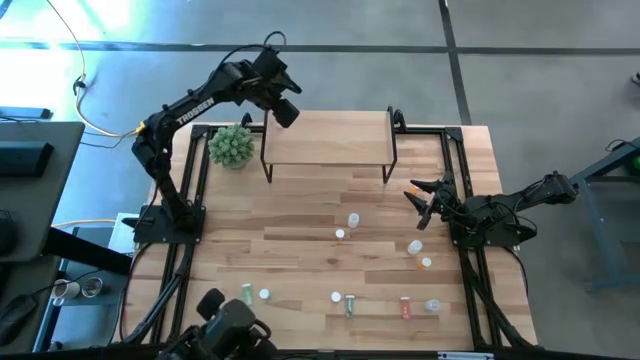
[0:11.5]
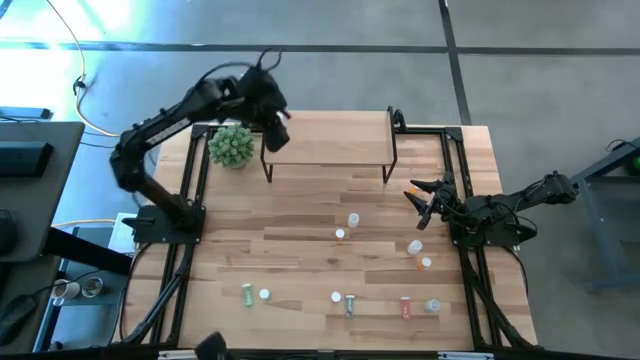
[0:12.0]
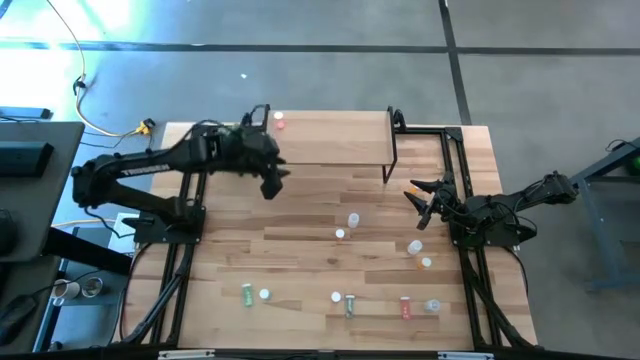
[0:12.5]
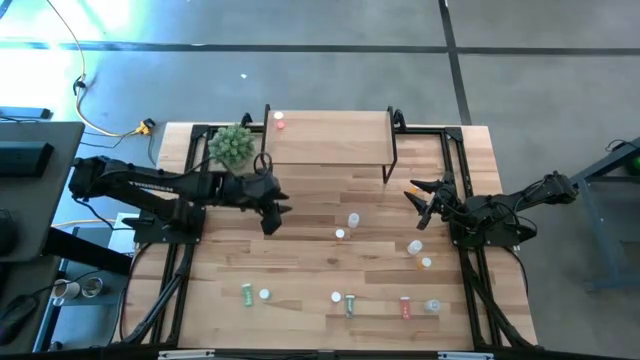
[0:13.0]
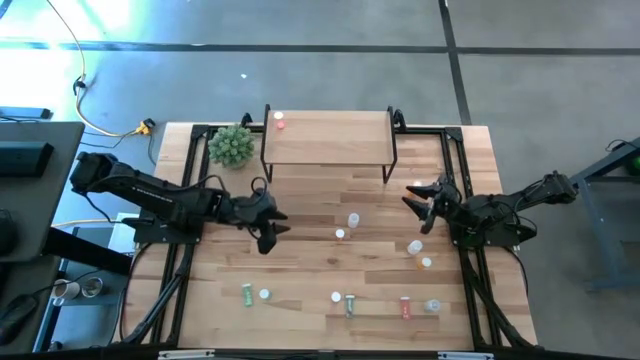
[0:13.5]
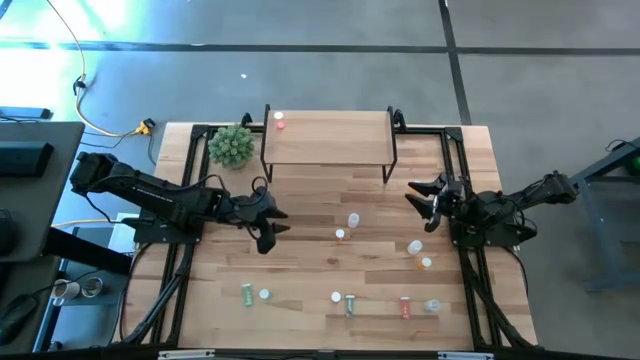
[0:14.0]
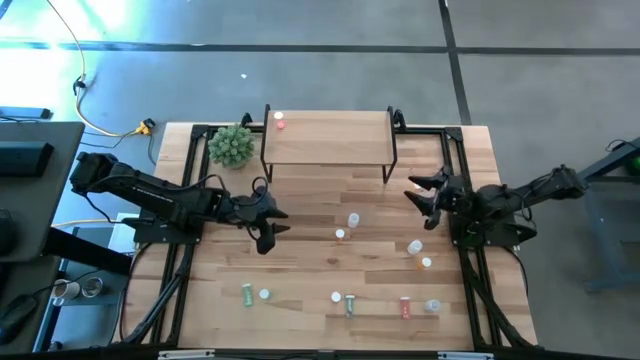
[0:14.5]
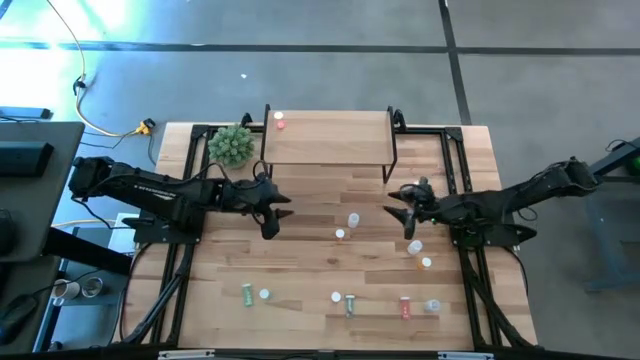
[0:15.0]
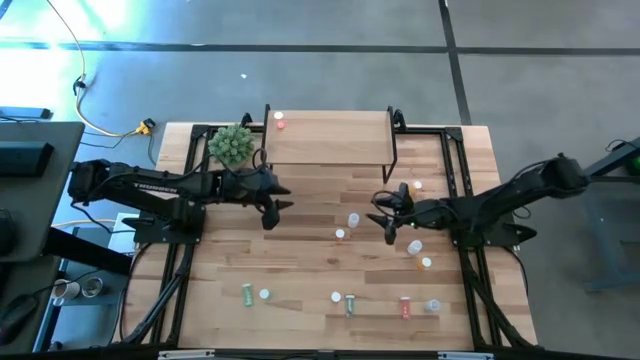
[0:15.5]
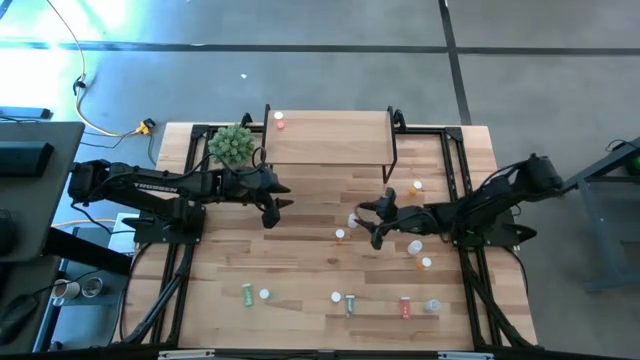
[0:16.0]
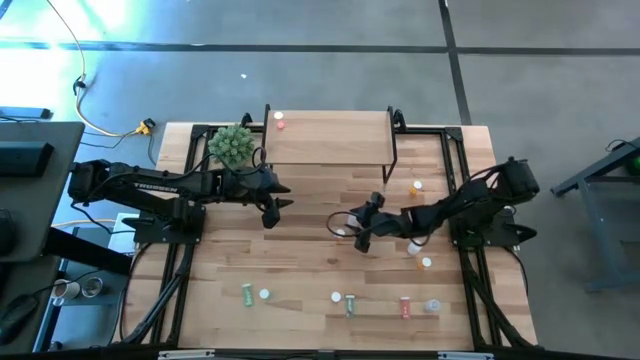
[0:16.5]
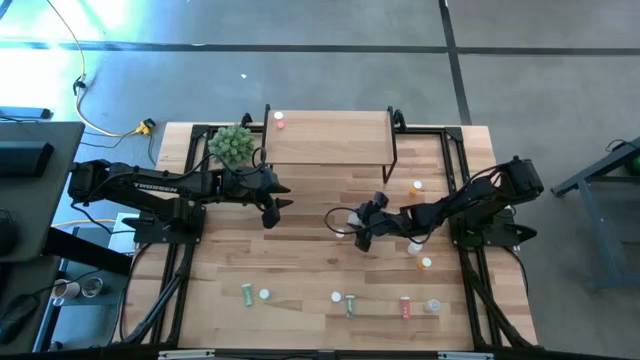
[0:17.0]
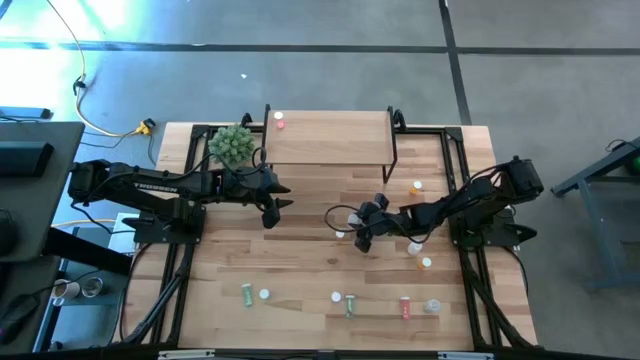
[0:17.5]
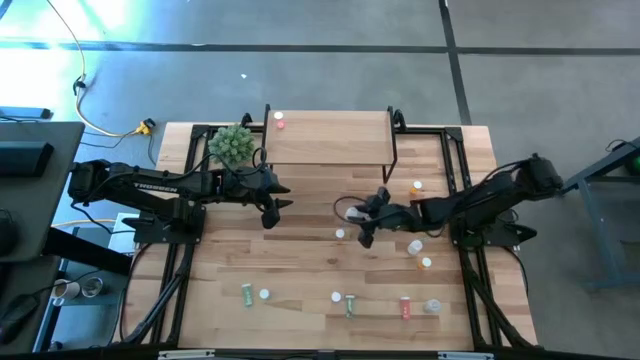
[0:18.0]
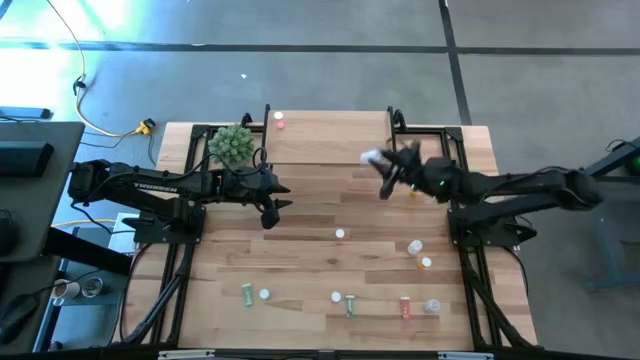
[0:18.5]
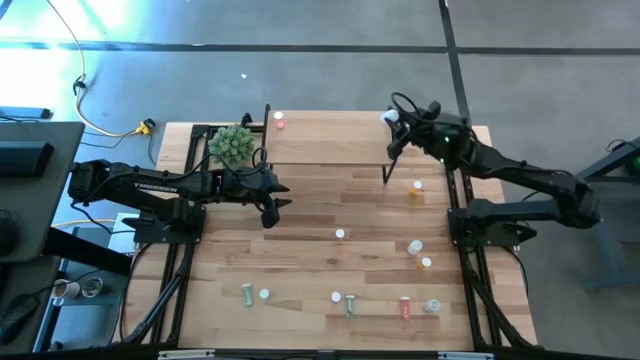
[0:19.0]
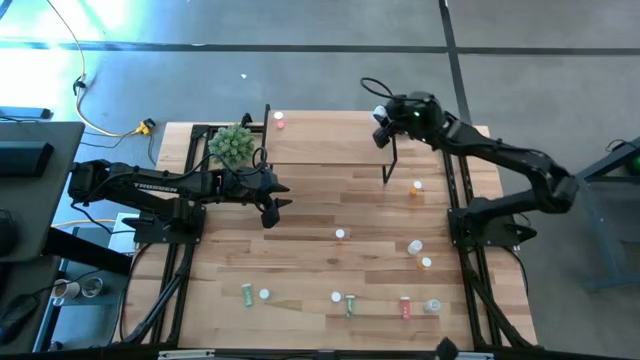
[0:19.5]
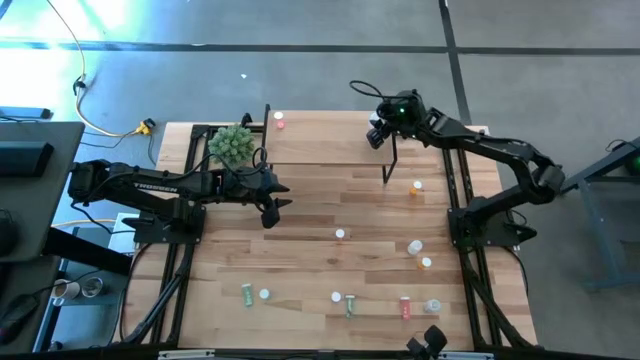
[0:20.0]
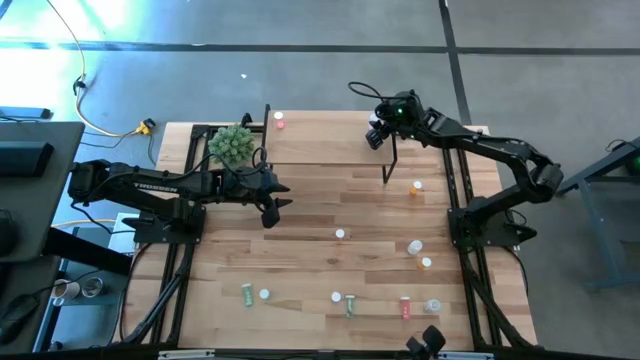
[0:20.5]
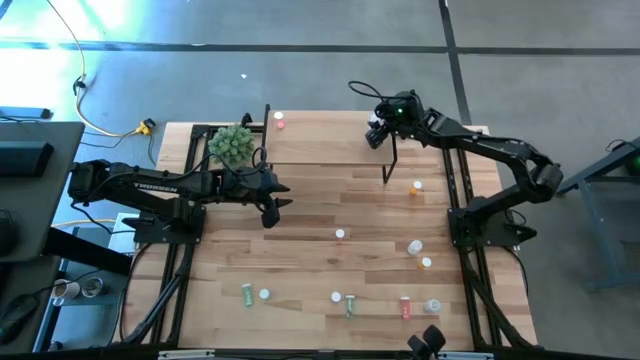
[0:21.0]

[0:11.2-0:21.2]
Task: Pick and place medicine bottles onto shelf by color
Put the top white pill bottle on the shelf

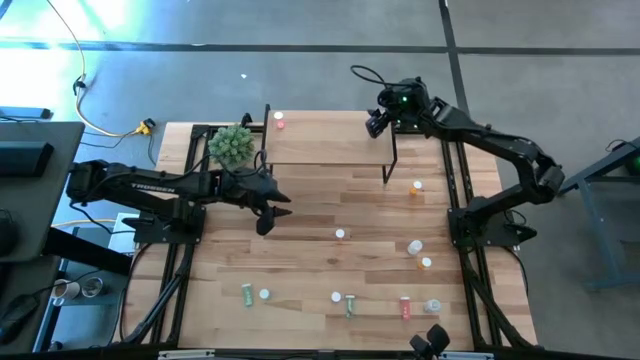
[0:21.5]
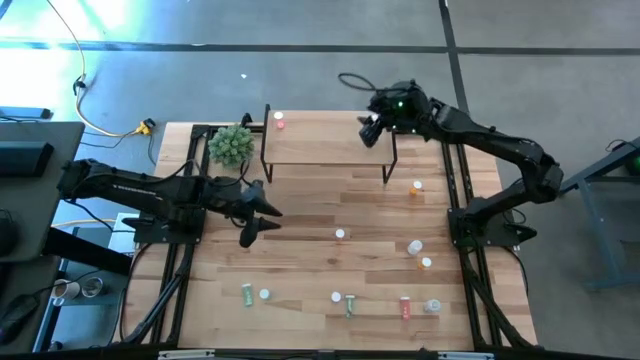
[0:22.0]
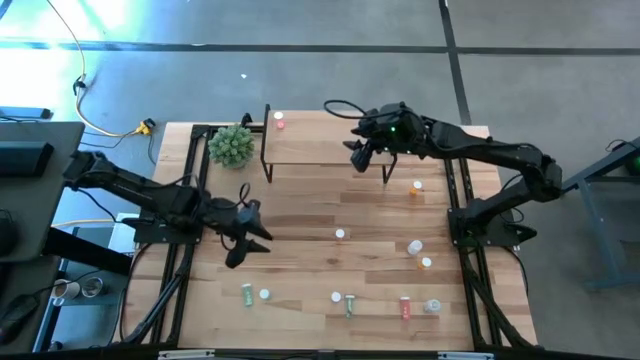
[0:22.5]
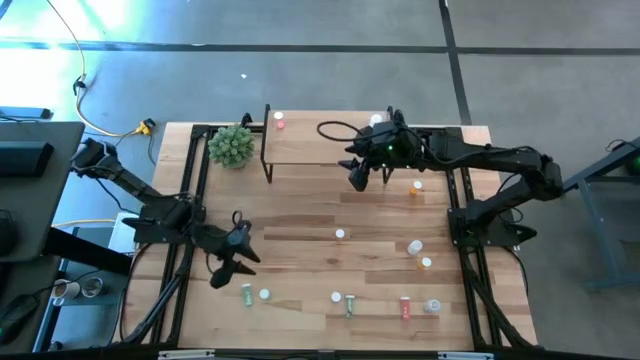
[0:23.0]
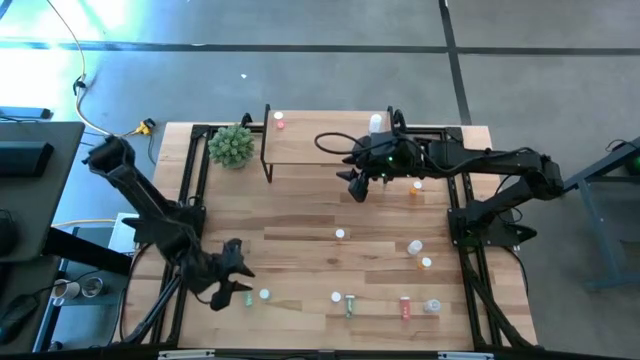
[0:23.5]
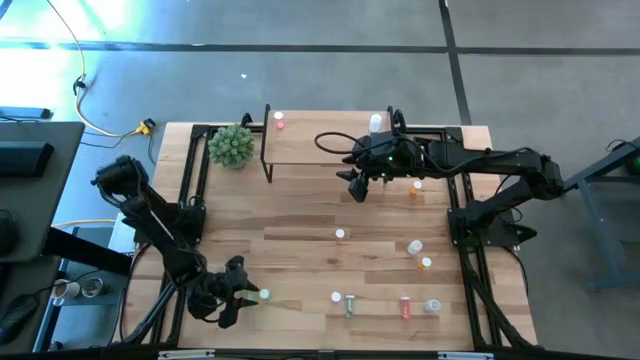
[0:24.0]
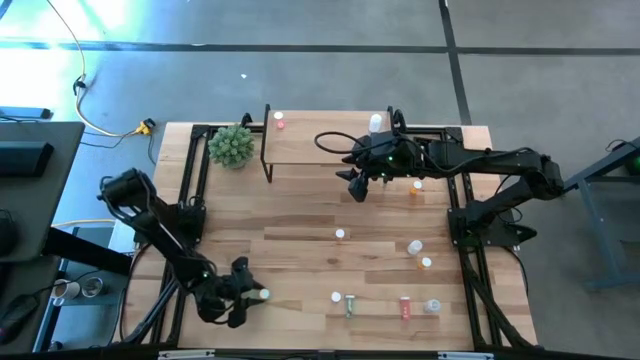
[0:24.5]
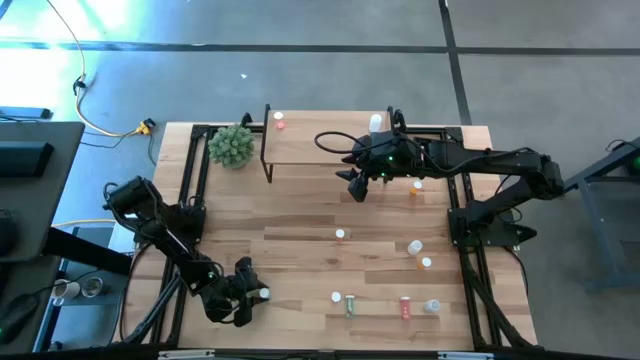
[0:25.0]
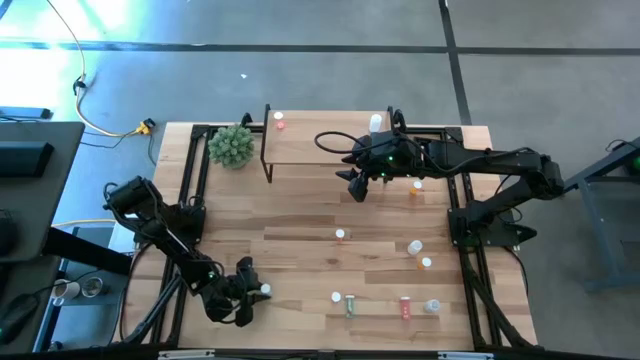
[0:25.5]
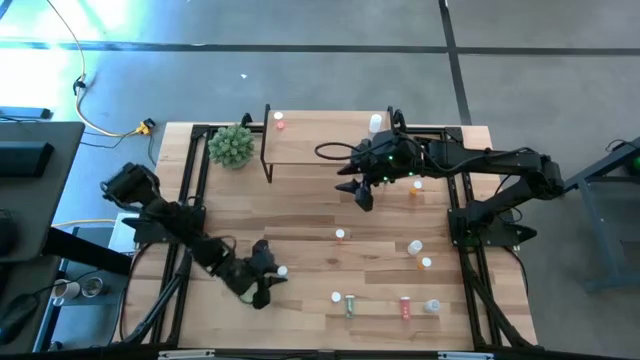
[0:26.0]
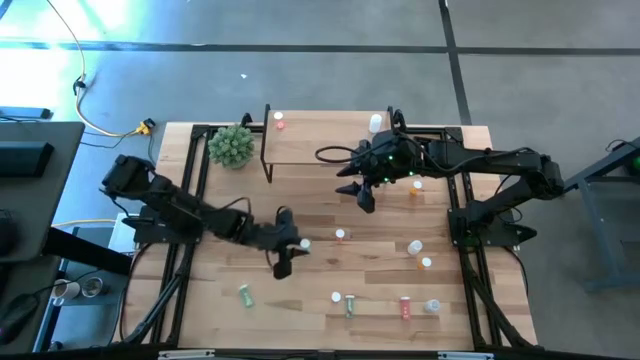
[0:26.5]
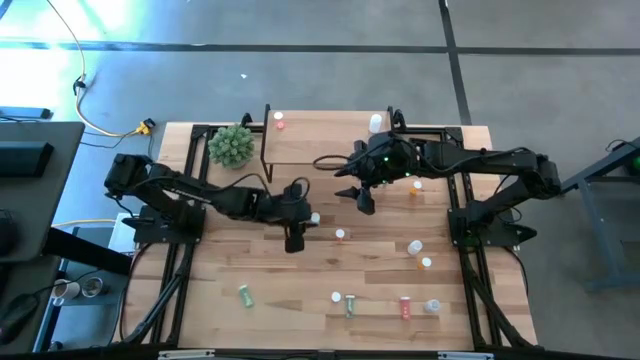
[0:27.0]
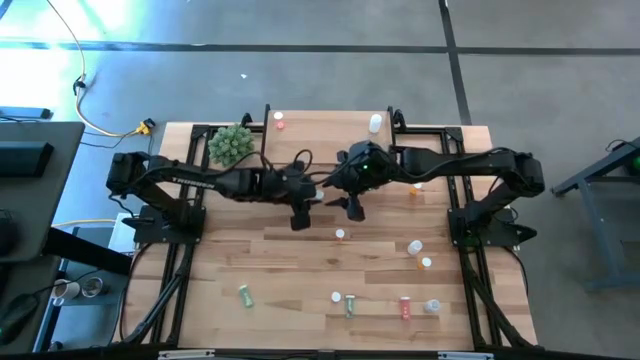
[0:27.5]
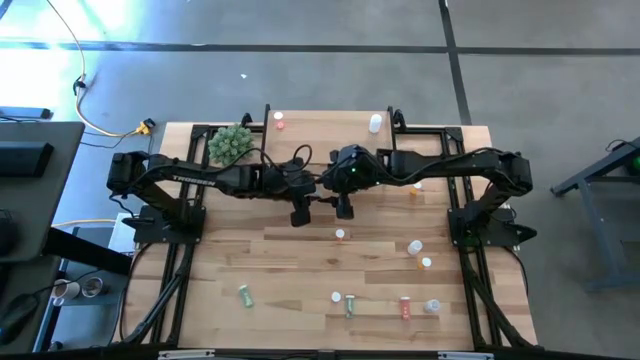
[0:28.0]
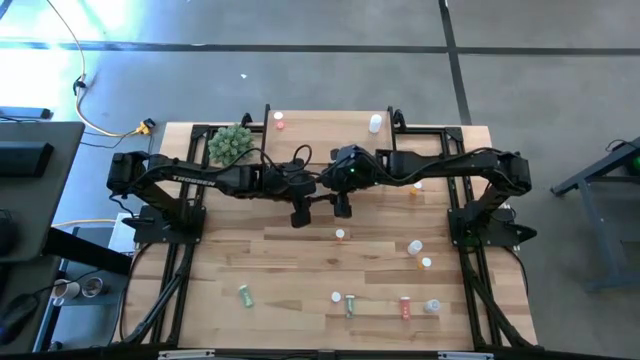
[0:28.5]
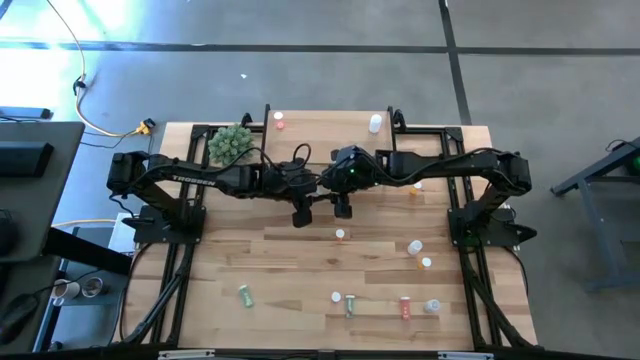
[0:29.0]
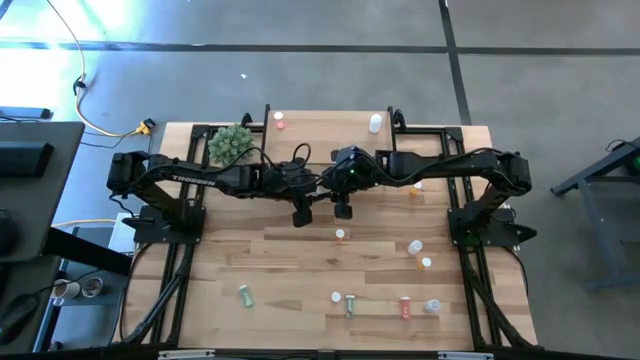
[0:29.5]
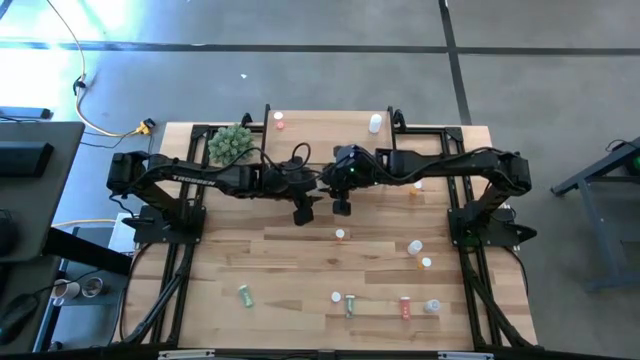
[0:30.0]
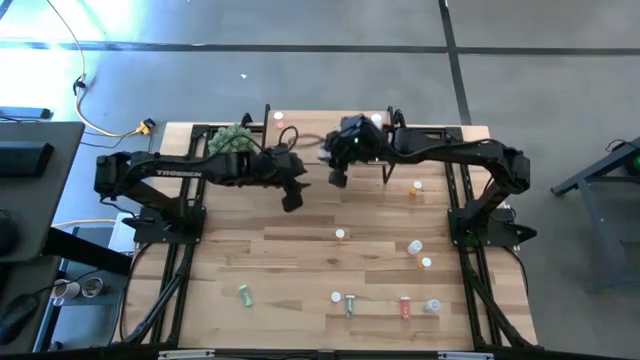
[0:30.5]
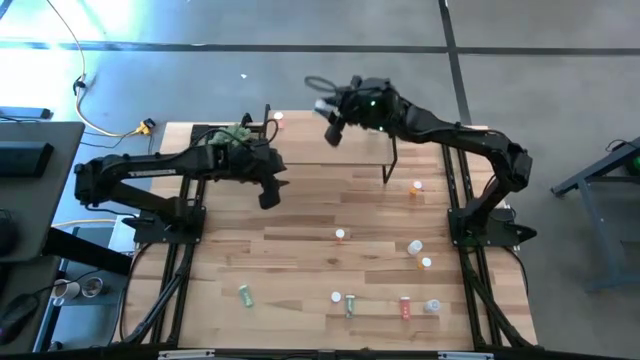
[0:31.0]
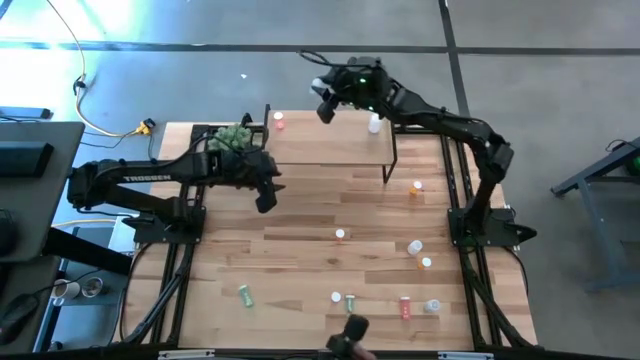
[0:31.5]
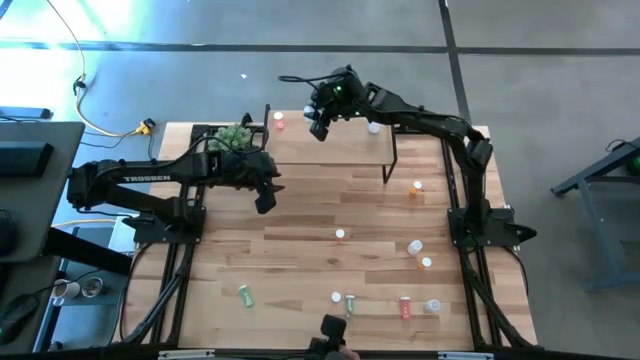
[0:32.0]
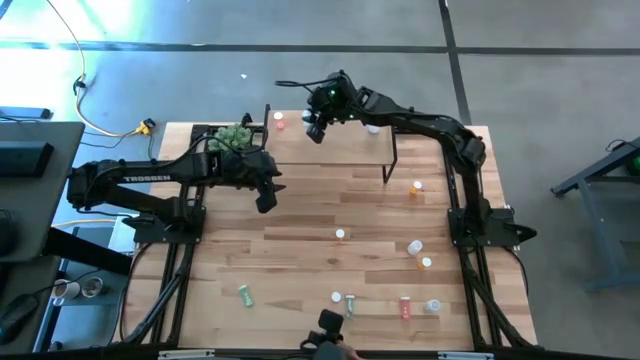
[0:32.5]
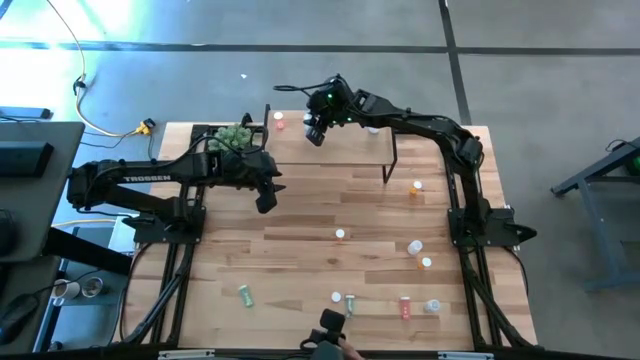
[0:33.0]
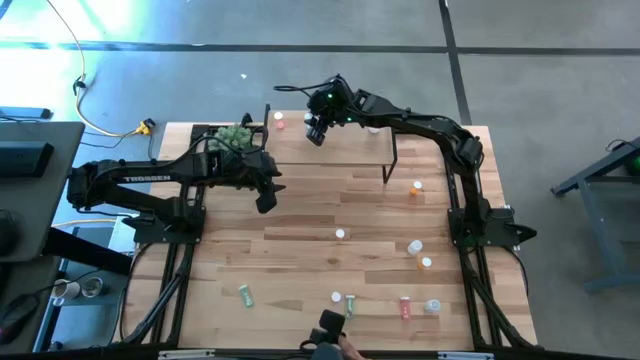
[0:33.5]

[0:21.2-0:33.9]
Put the center blue pill bottle on the shelf
